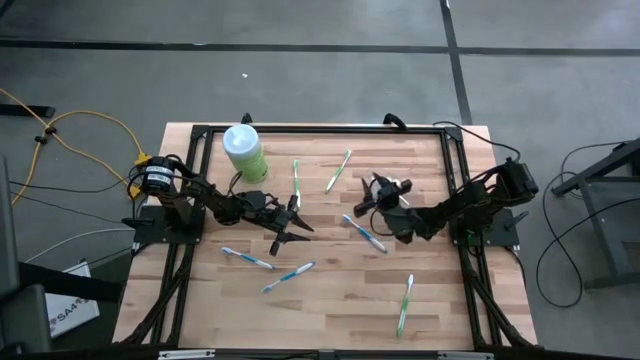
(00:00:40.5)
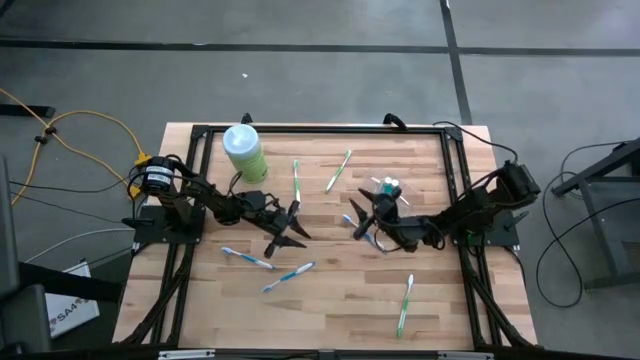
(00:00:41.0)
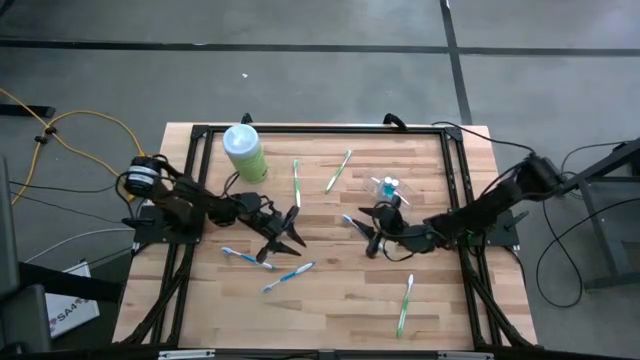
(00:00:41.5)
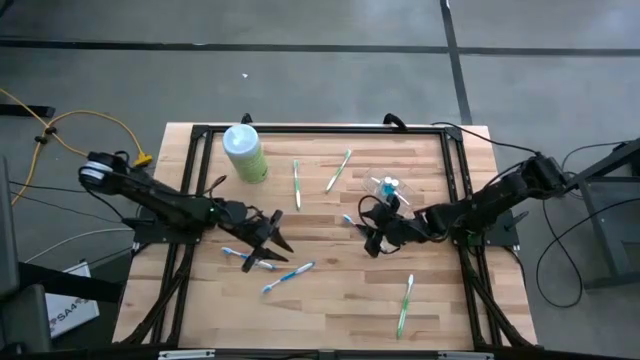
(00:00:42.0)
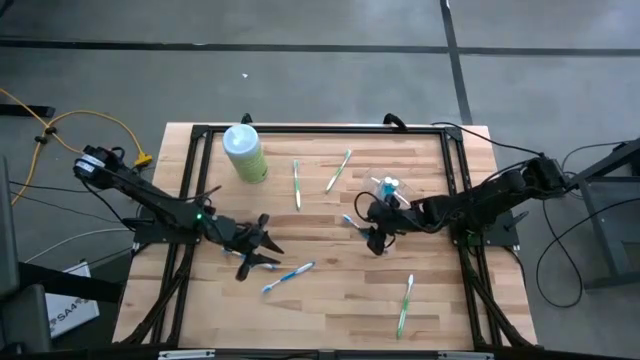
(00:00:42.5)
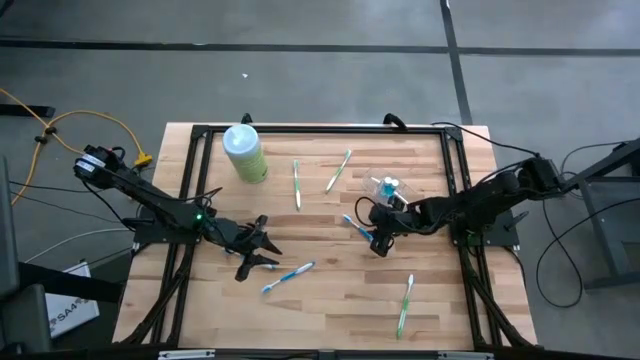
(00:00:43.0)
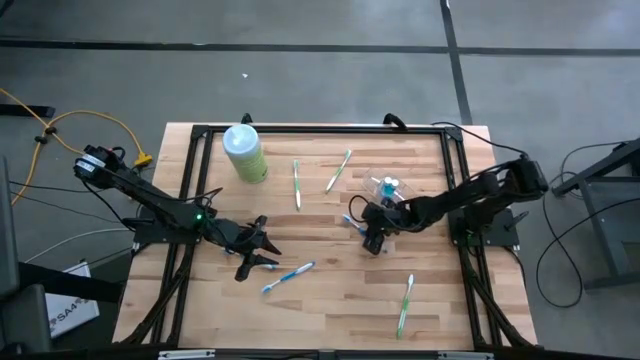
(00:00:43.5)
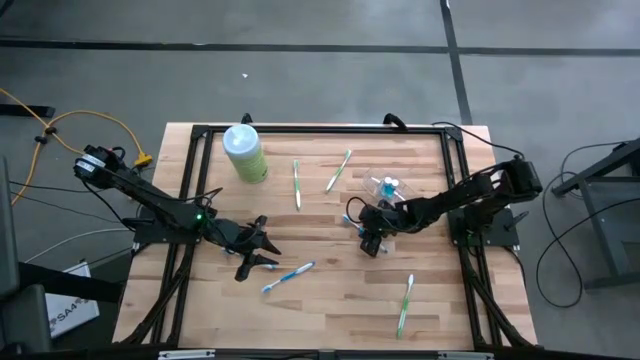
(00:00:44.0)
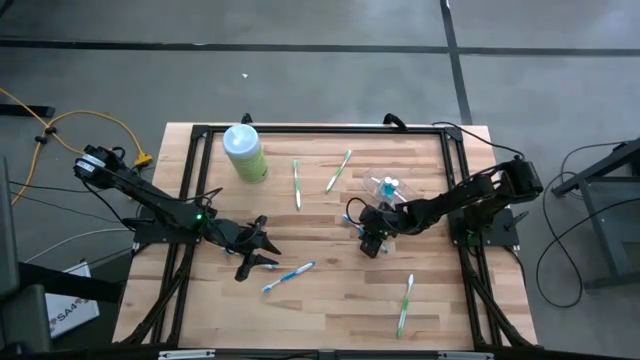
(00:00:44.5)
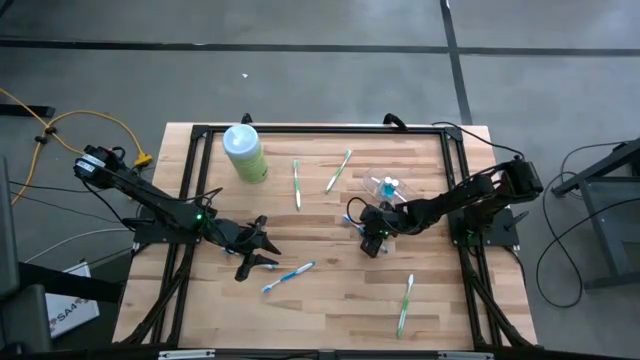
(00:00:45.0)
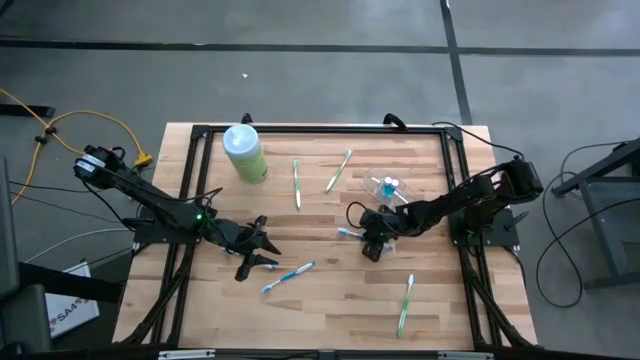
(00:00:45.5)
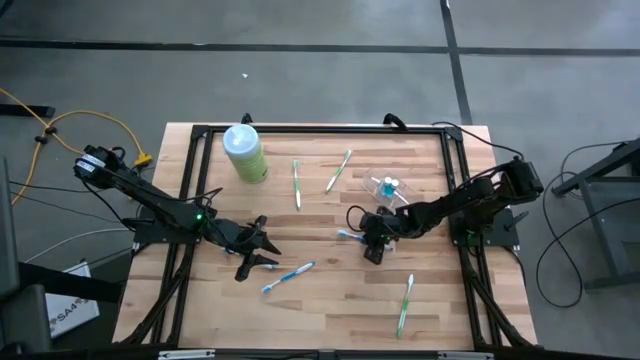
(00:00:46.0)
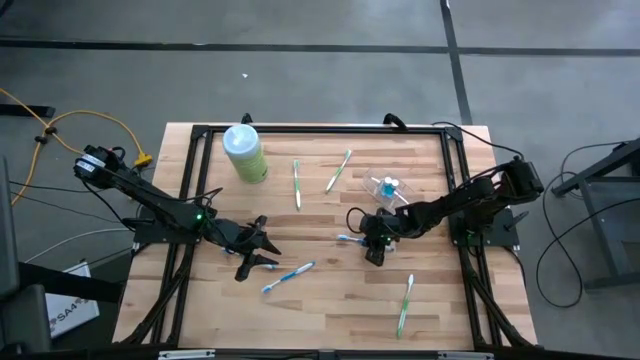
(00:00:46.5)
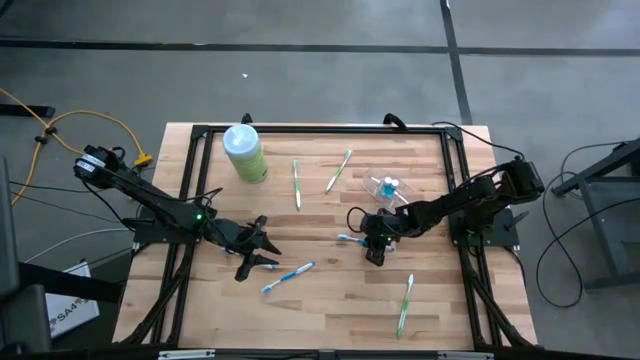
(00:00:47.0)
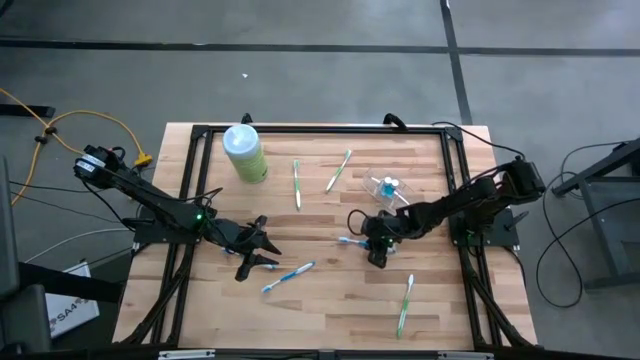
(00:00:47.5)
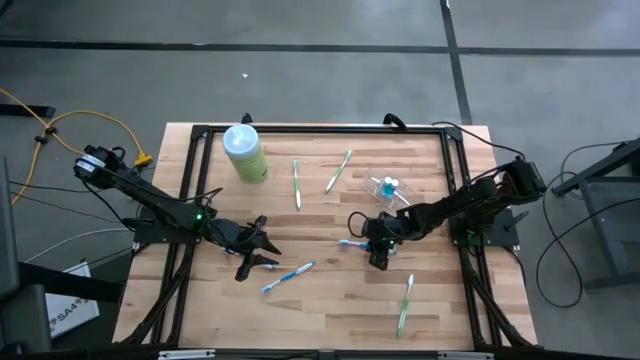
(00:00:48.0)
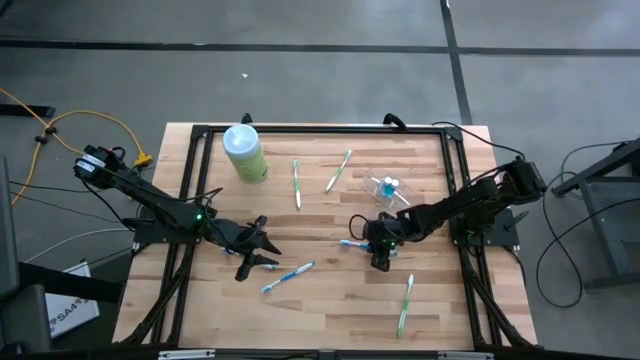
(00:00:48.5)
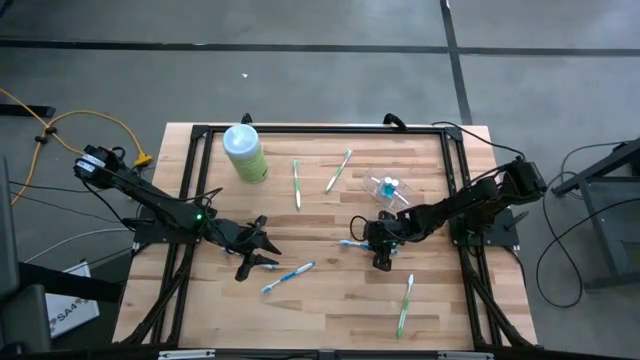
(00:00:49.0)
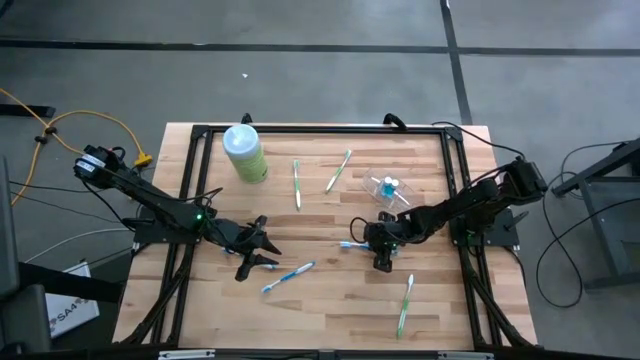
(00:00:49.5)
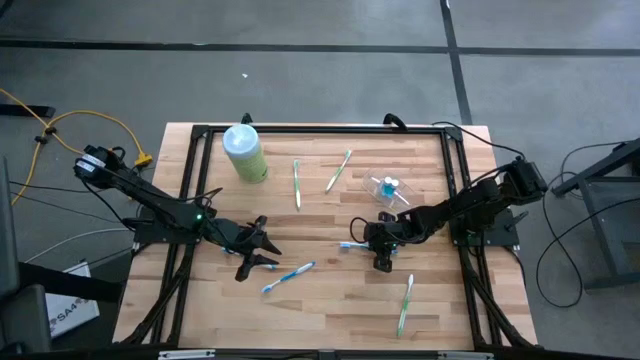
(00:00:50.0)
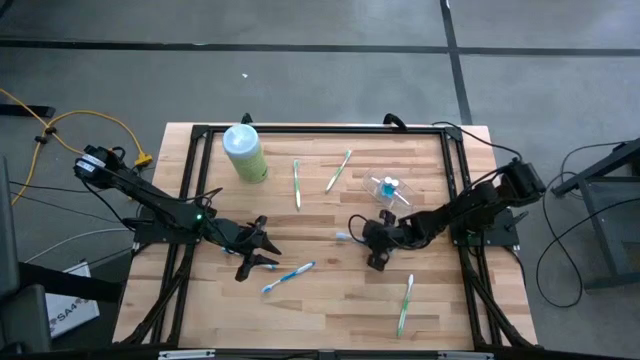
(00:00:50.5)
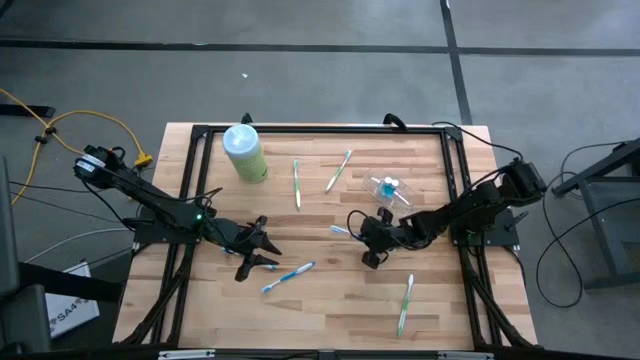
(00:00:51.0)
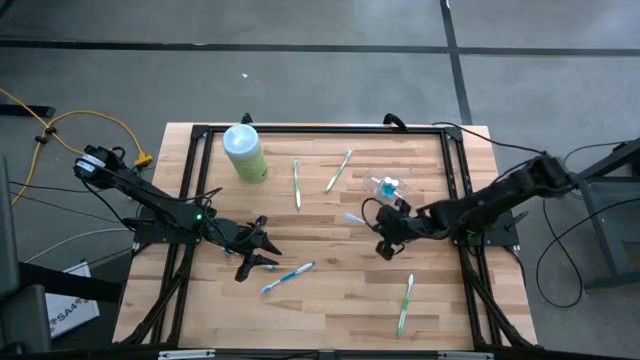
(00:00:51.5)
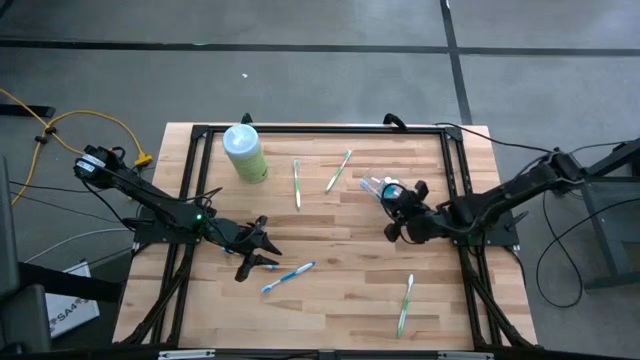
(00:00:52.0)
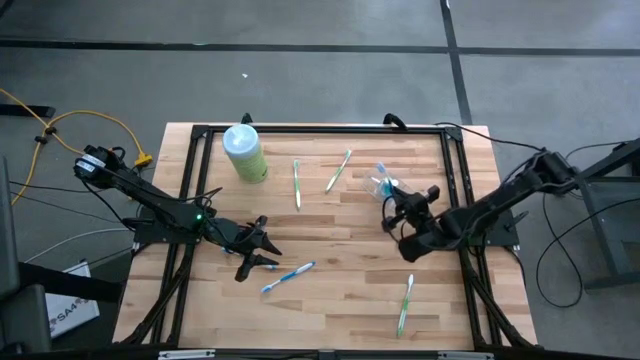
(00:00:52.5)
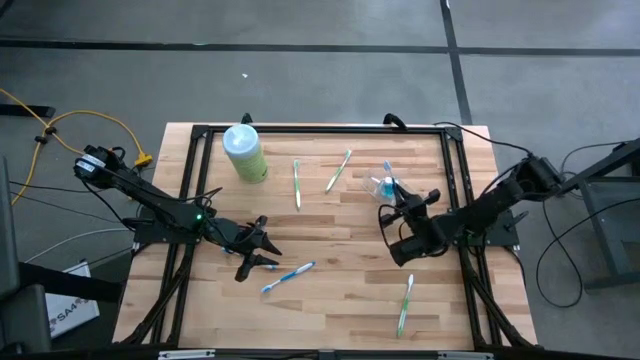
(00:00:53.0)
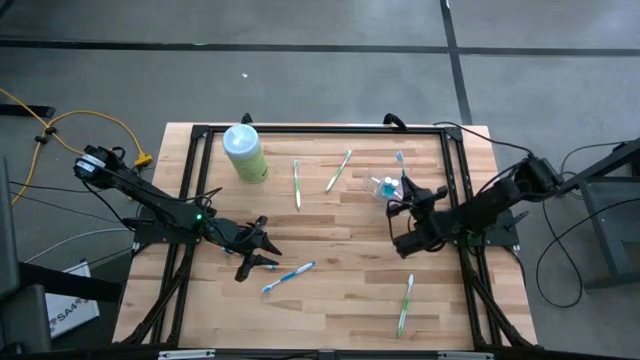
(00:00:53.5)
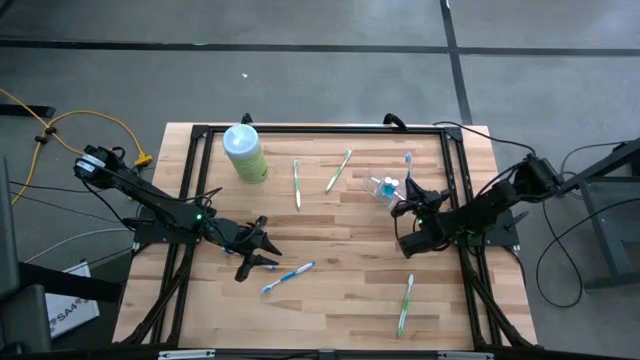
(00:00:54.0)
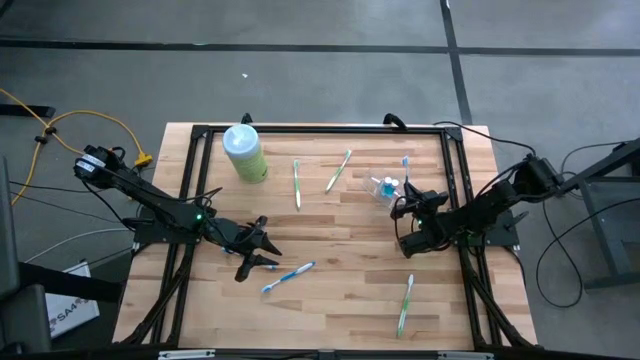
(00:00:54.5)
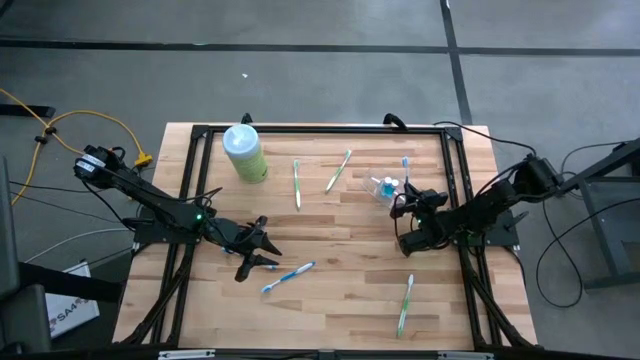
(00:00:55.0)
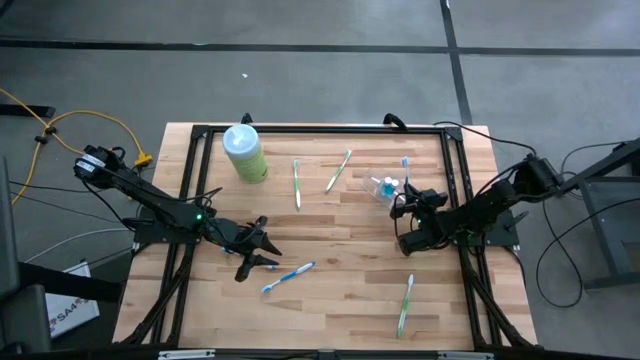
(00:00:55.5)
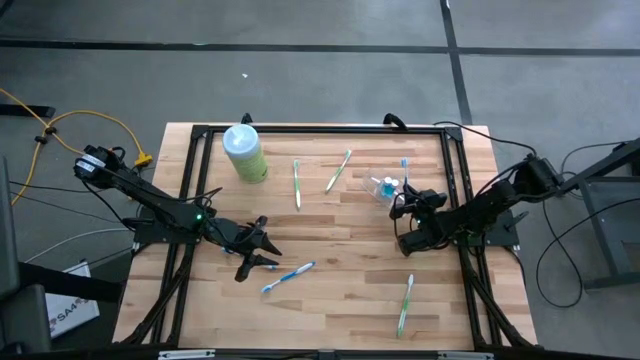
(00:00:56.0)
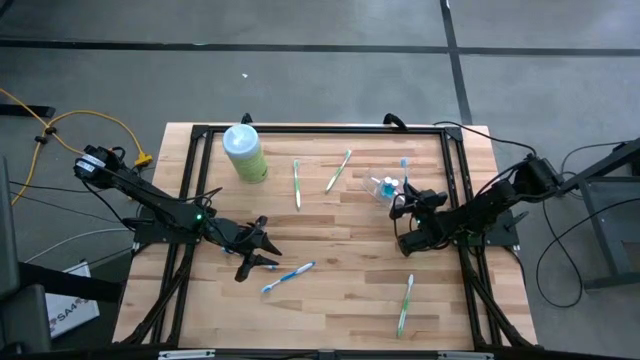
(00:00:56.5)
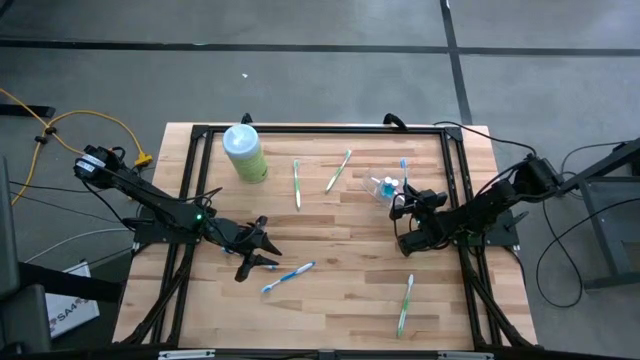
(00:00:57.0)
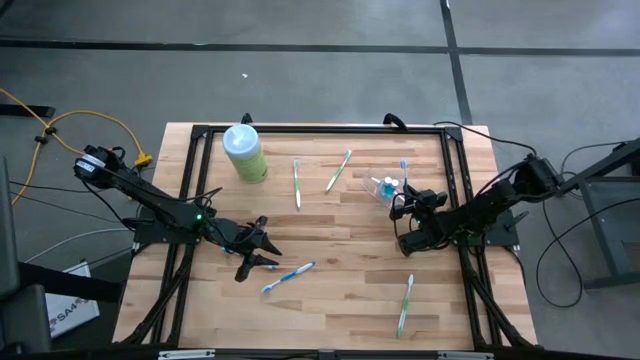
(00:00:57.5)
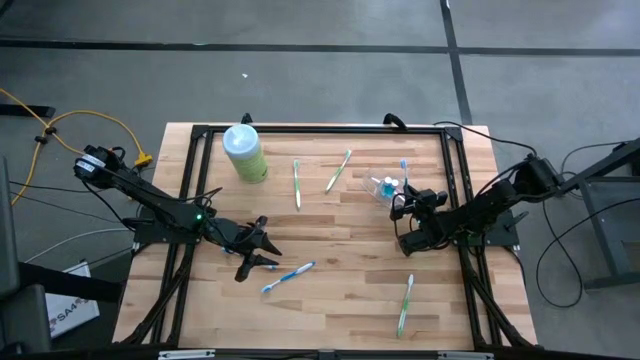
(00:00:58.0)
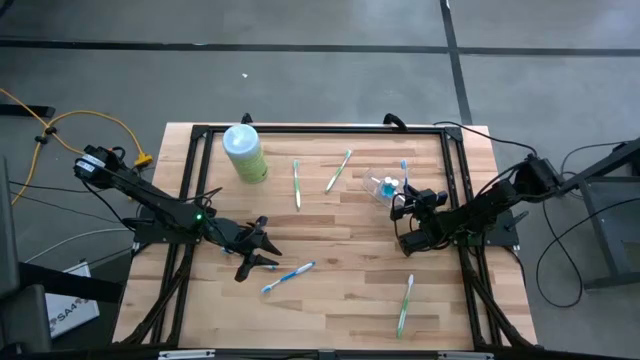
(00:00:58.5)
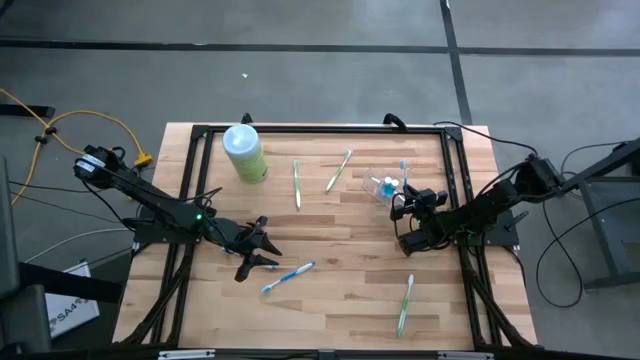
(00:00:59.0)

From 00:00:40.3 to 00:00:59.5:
Task: Pick & Place toothbrushing station
Put the right blue toothbrush into the right of the transparent organizer
